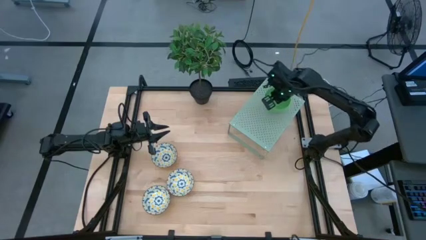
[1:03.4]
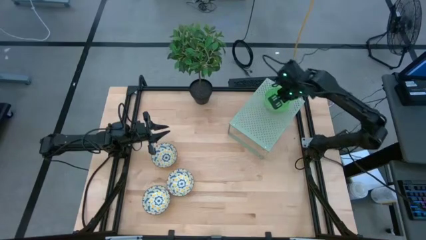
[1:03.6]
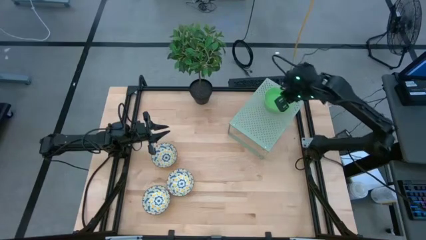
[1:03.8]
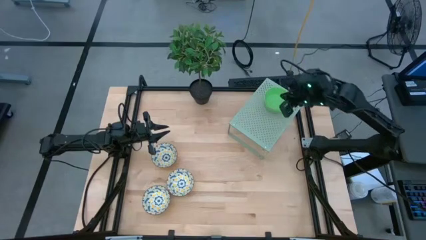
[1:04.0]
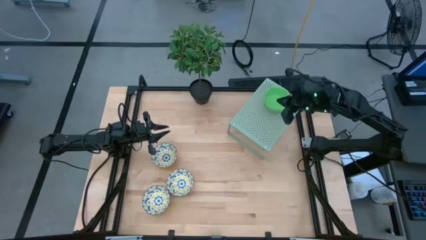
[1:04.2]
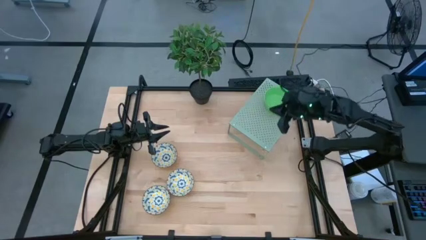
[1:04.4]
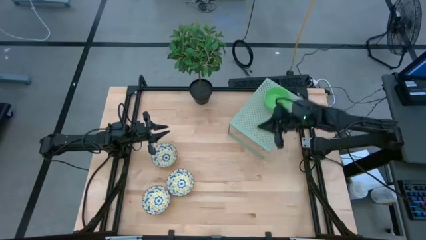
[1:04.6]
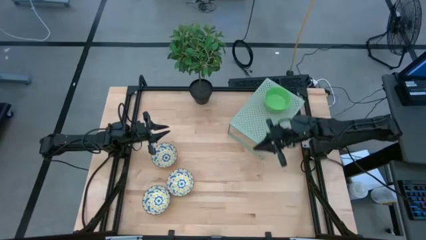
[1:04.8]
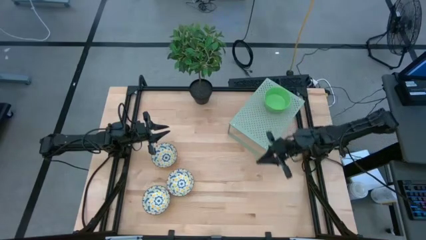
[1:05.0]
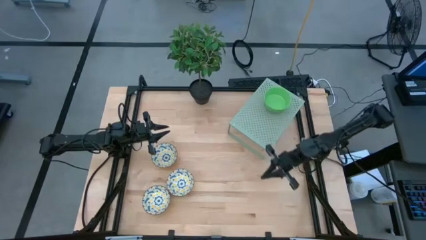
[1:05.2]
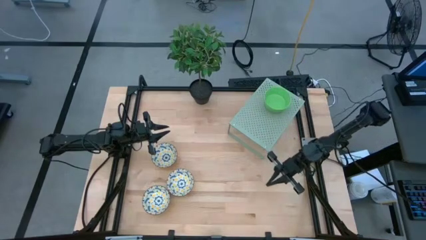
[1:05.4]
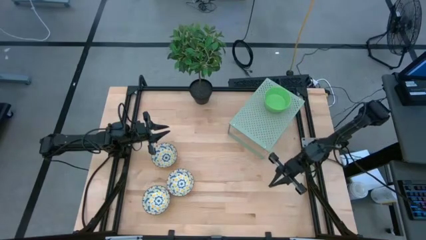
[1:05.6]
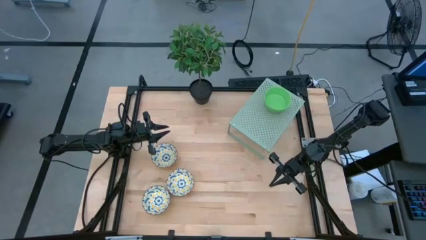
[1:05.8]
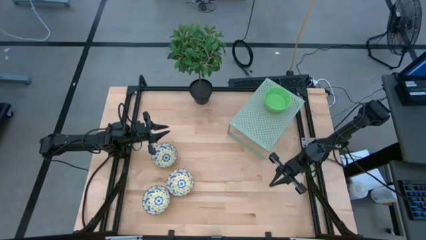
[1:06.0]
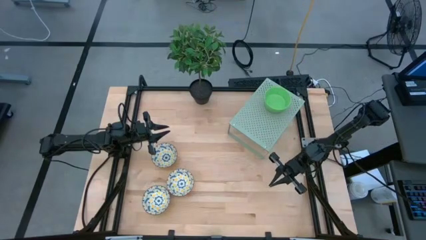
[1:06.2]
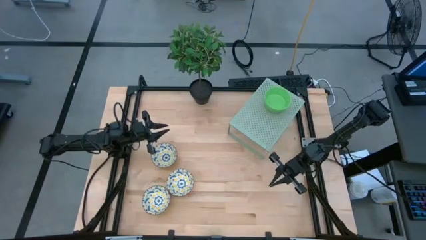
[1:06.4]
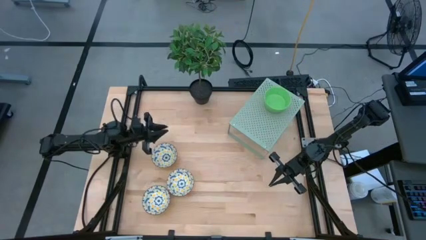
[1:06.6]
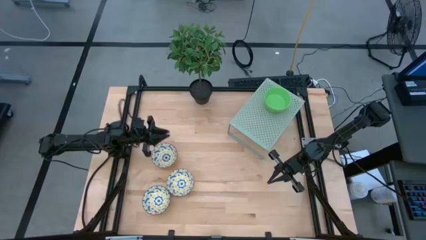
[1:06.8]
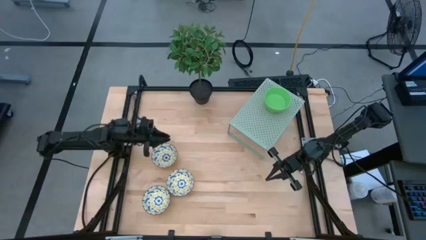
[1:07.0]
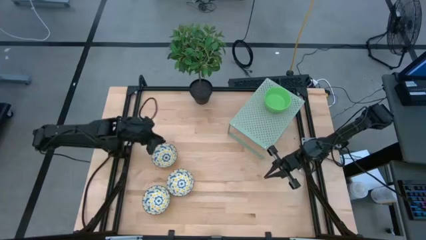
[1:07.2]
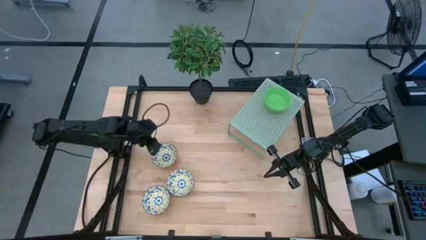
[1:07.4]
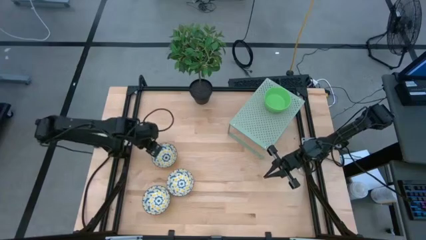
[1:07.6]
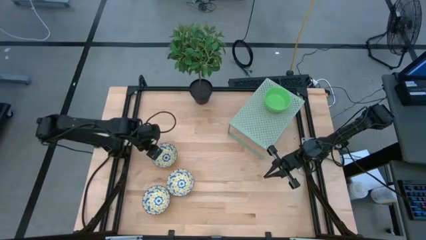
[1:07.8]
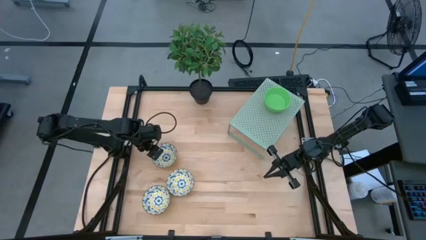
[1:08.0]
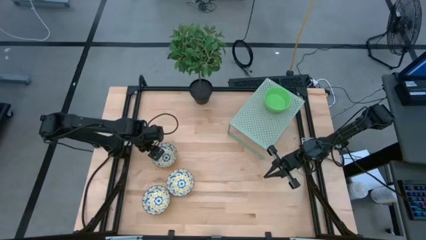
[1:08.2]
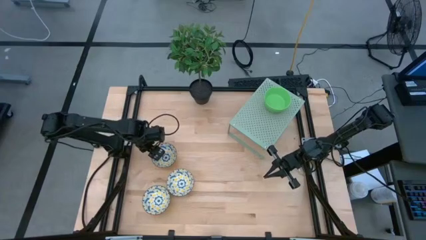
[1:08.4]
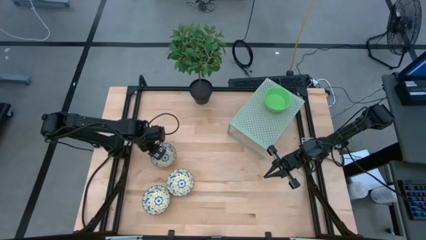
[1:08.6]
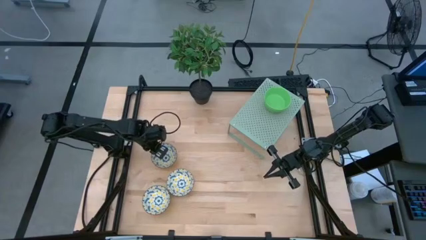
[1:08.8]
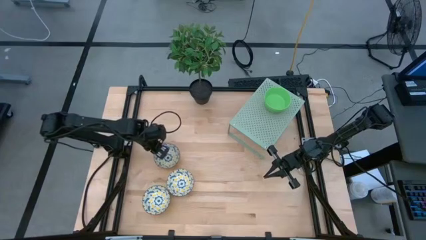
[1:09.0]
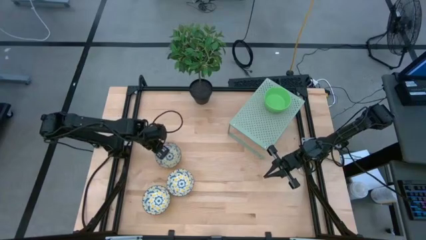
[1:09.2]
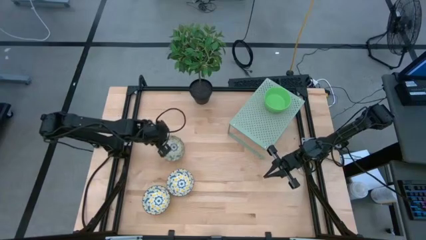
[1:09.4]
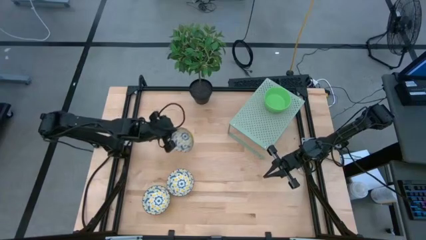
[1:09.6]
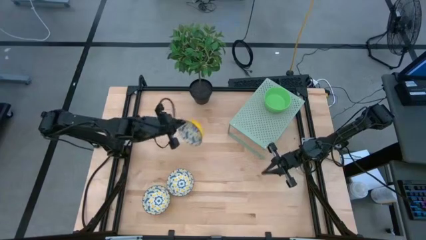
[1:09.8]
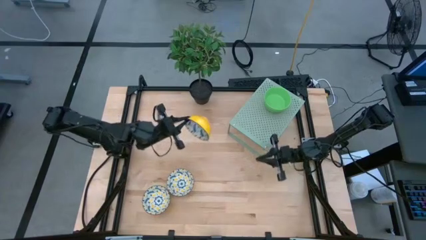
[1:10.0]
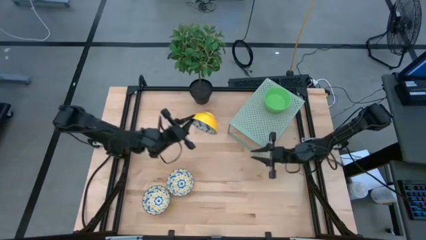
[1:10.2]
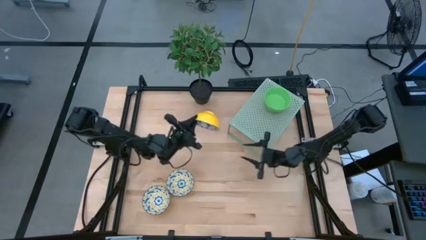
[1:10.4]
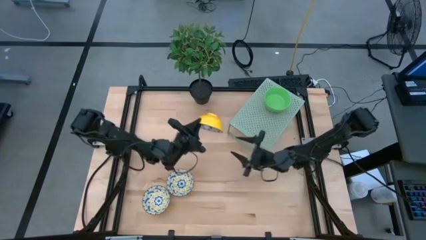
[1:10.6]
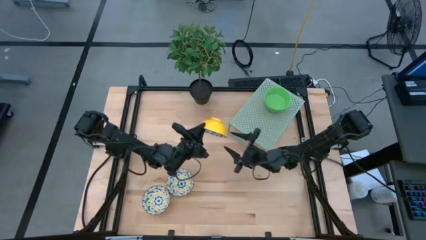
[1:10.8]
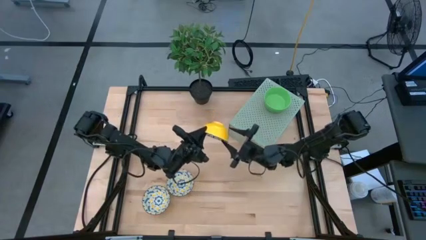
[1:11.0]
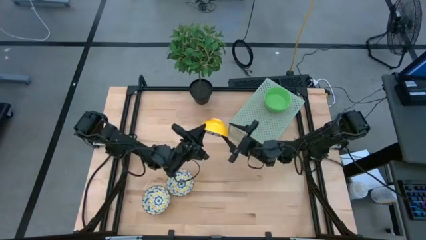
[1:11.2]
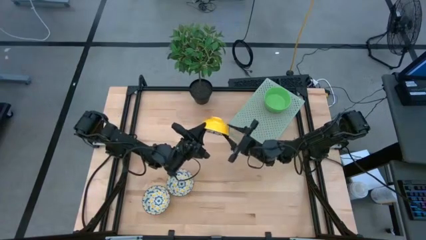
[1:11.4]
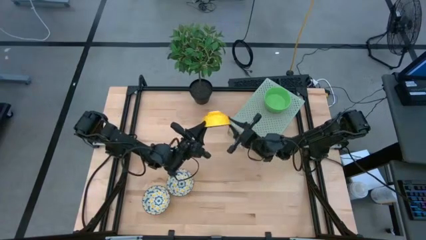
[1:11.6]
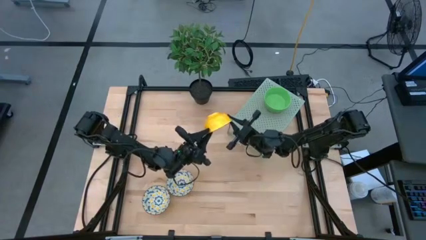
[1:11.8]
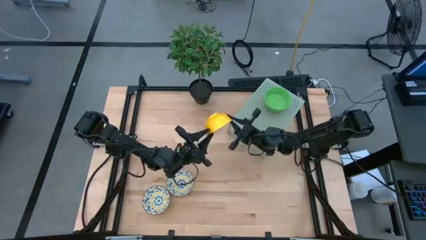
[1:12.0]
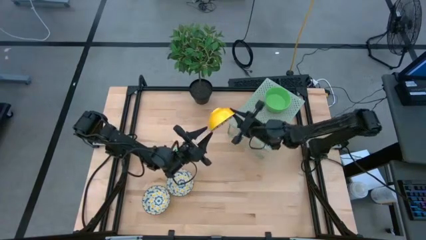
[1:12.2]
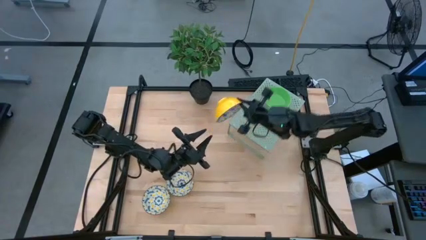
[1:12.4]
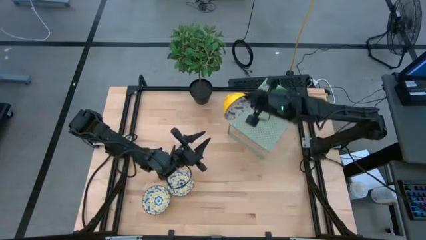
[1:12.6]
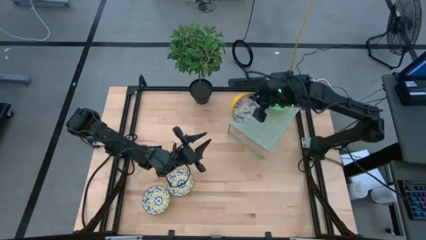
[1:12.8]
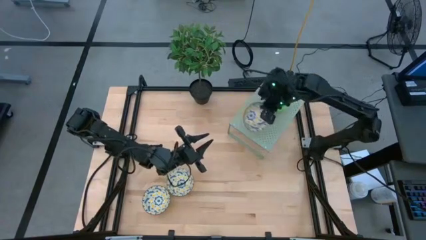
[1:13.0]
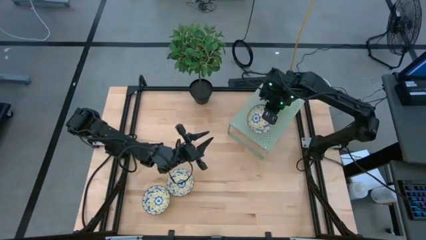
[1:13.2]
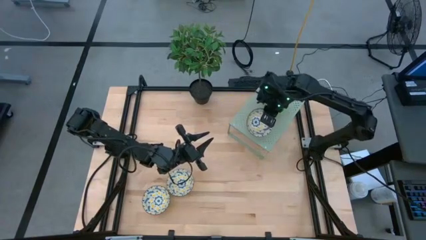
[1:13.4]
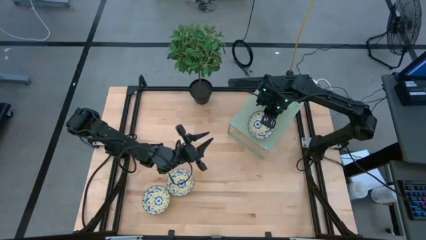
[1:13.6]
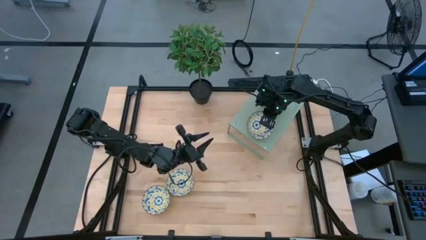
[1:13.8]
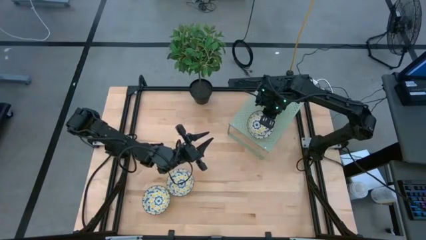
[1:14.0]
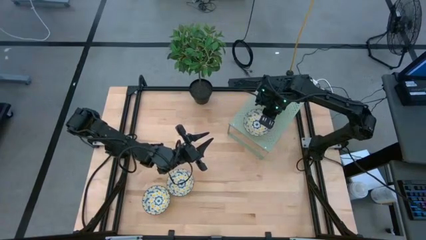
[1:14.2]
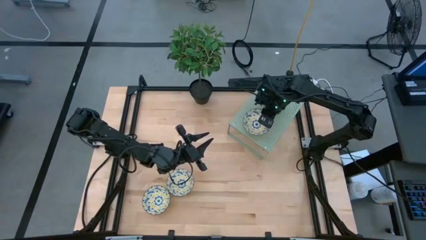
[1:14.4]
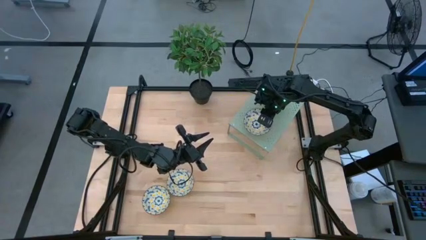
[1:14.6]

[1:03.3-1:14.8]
Task: Pick & Place Mini bowls
Put the top white patterned bowl on the shelf
